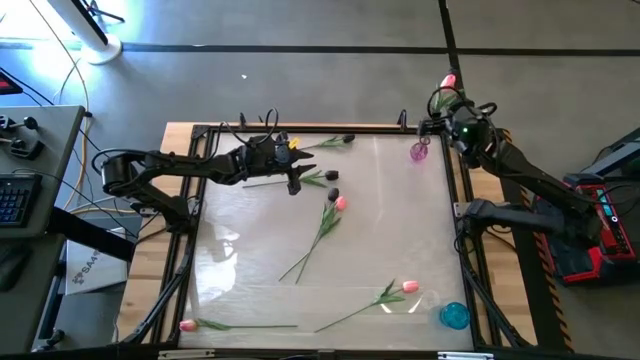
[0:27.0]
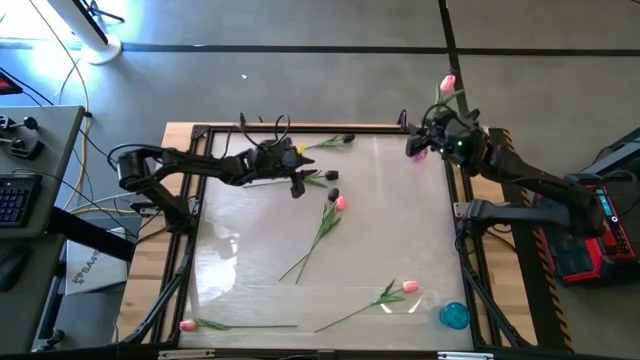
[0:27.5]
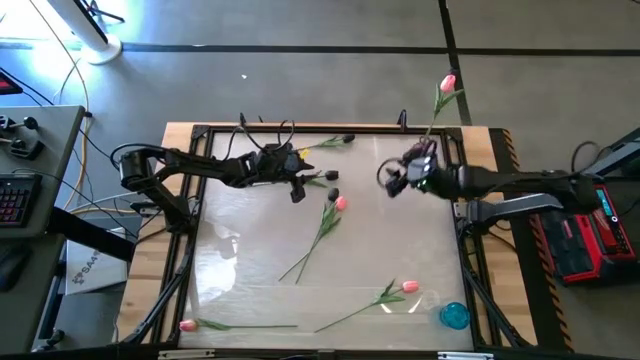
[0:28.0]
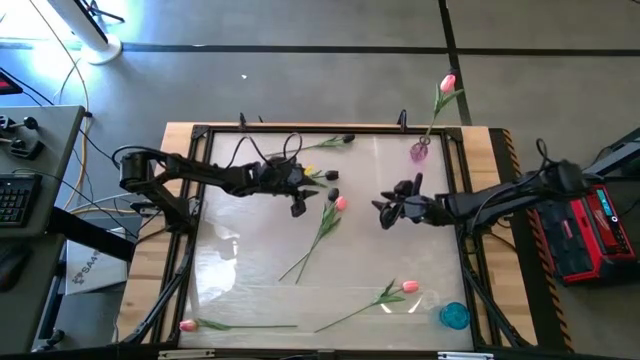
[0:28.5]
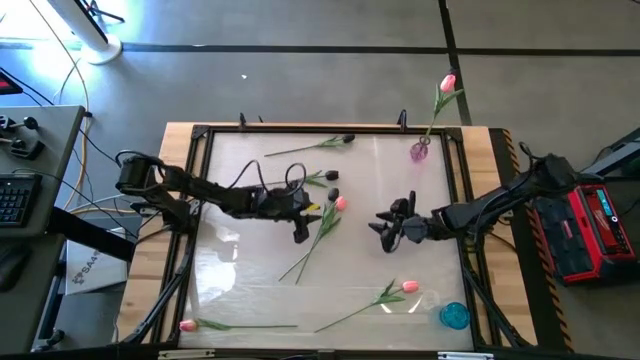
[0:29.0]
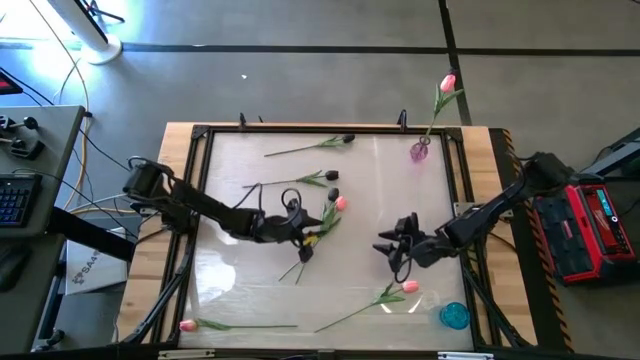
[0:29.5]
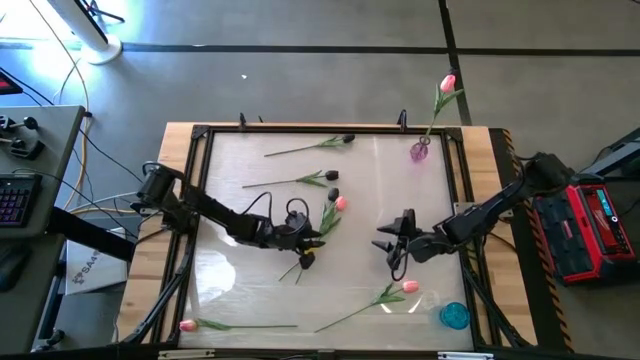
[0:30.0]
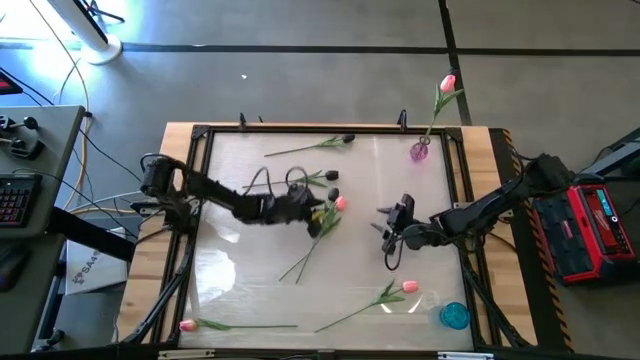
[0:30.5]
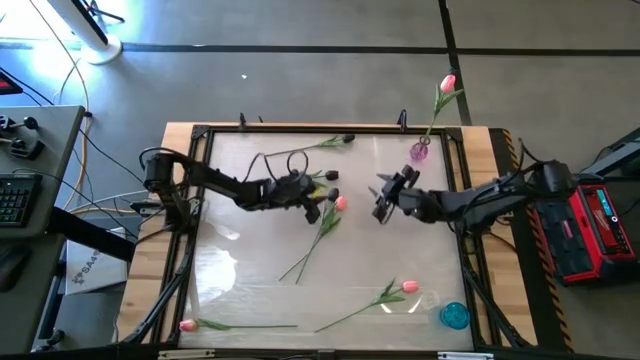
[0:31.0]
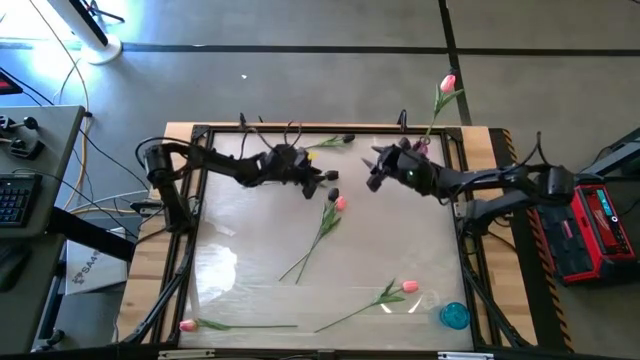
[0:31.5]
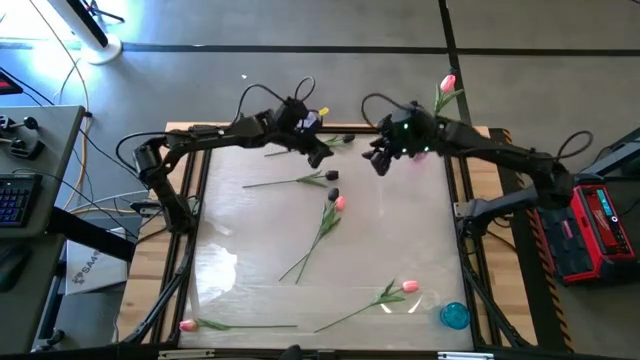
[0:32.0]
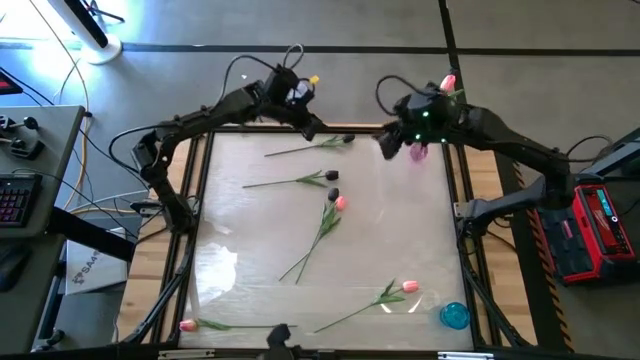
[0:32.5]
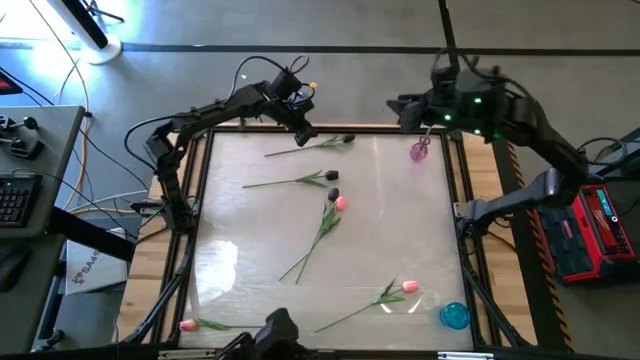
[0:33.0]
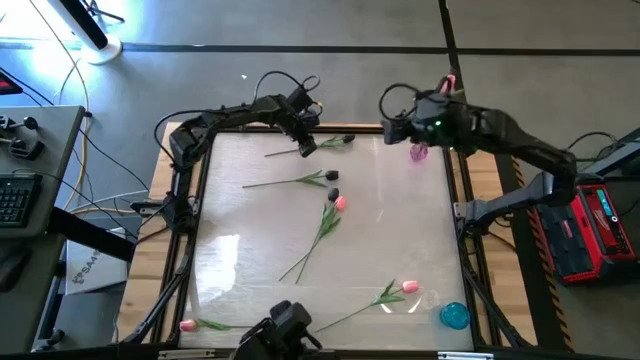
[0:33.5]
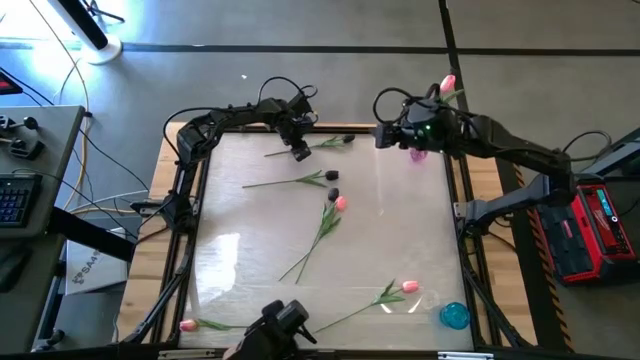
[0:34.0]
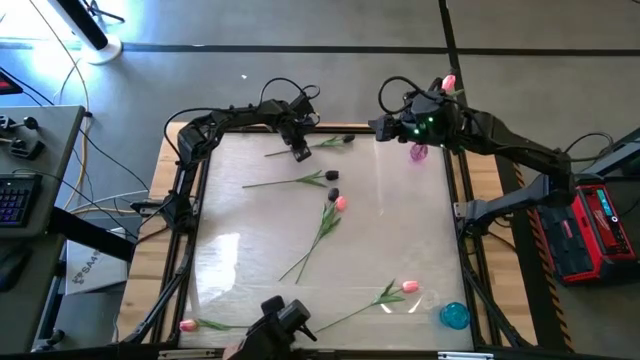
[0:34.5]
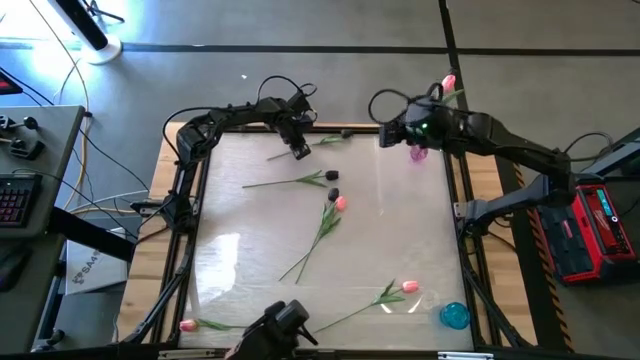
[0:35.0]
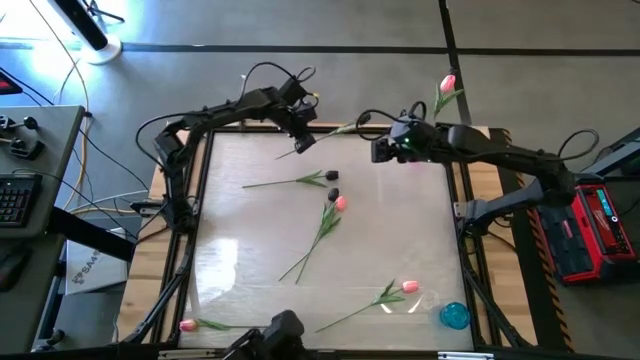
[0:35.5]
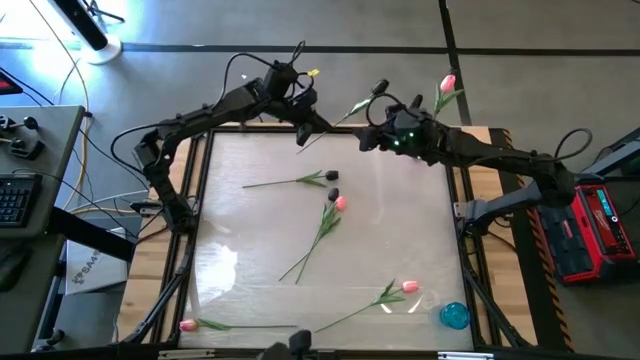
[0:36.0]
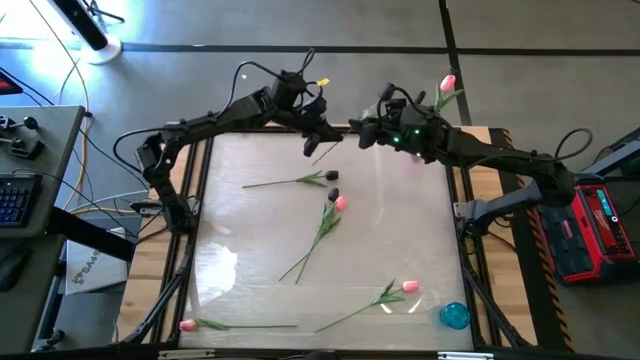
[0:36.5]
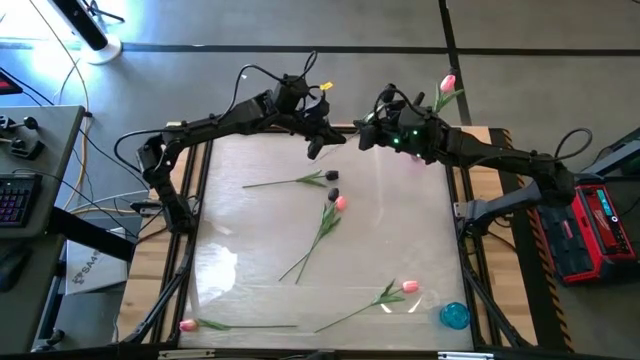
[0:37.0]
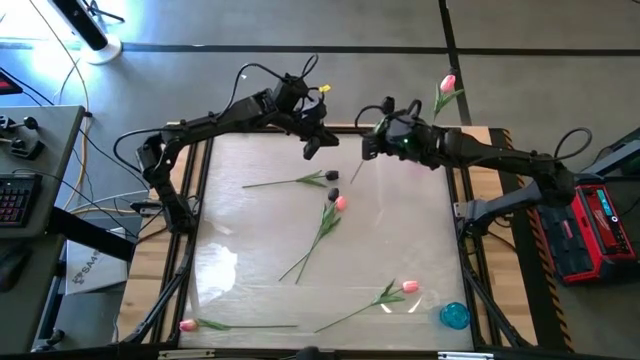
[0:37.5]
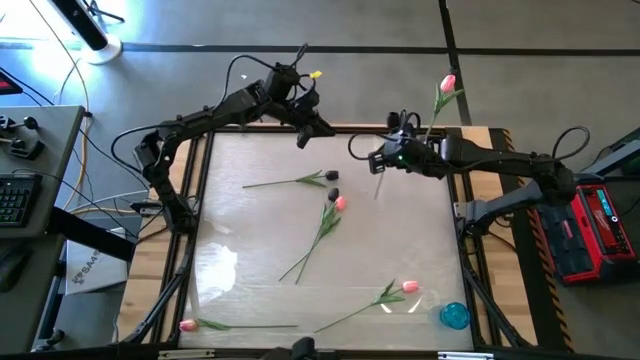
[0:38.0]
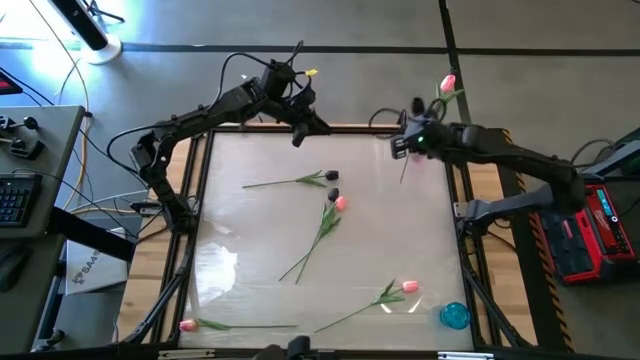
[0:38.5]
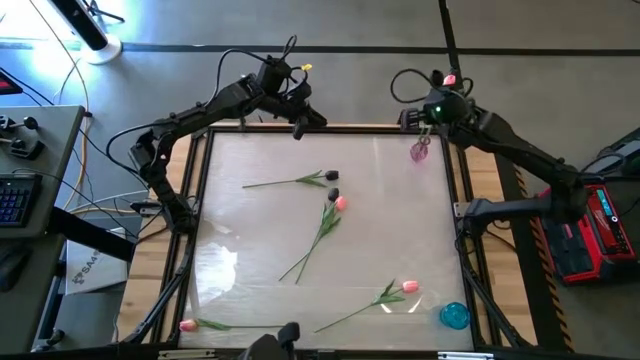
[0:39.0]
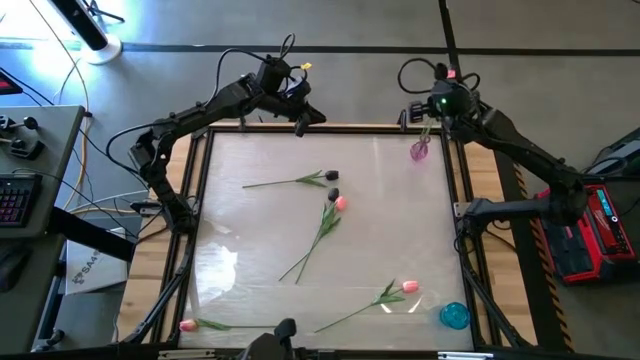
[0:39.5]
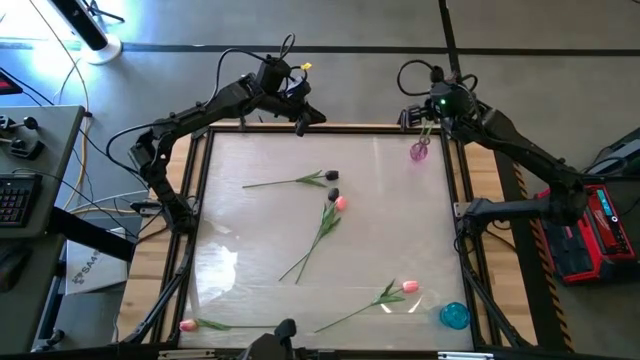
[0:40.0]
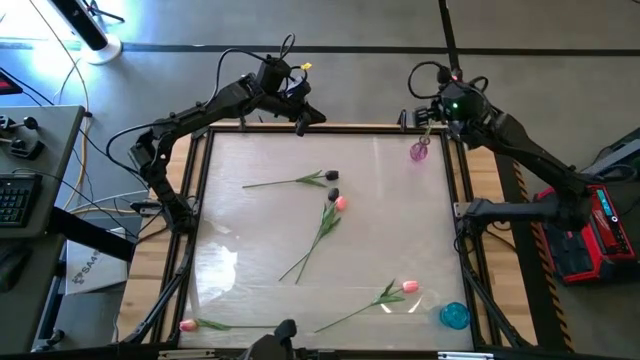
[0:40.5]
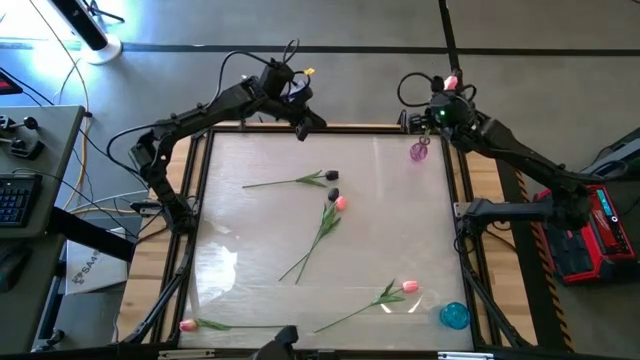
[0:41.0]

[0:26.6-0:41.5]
Task: Sort flowers into vase by color
Put the top center black flower into the purple vase

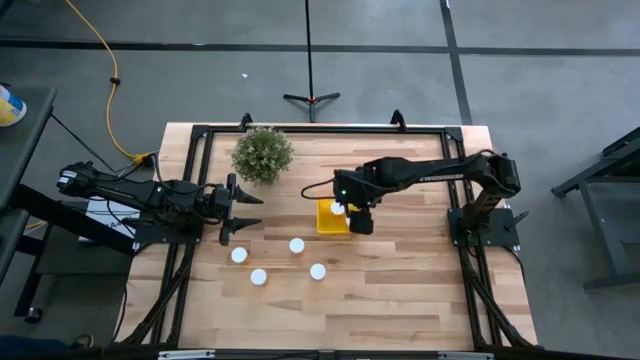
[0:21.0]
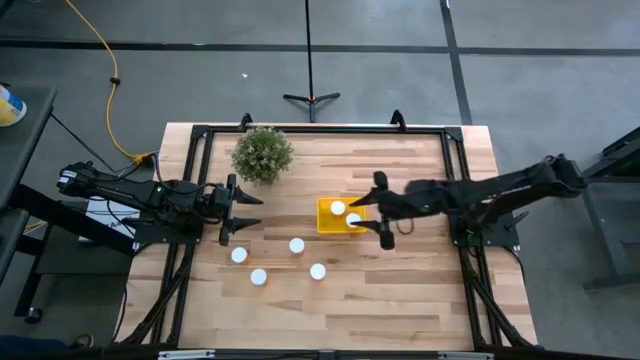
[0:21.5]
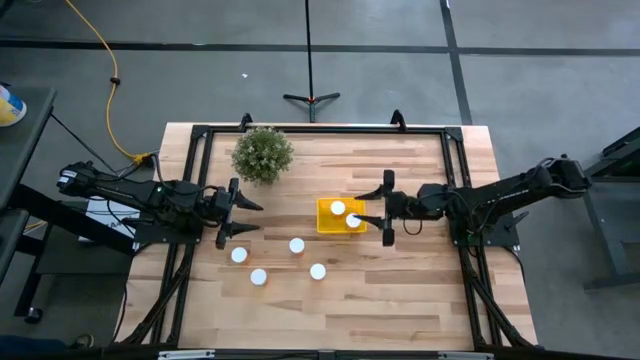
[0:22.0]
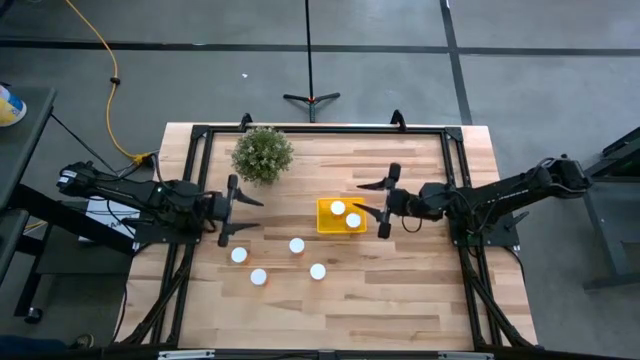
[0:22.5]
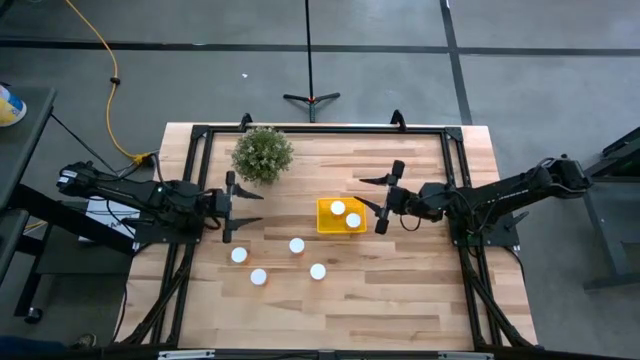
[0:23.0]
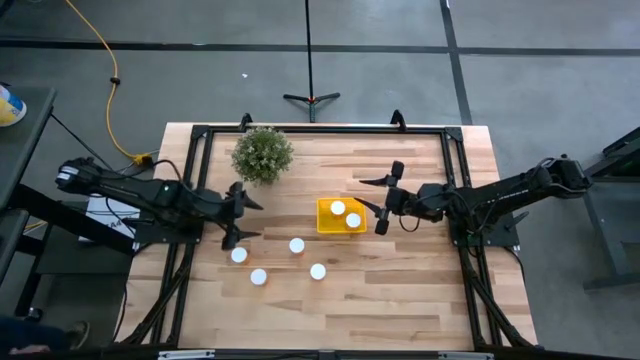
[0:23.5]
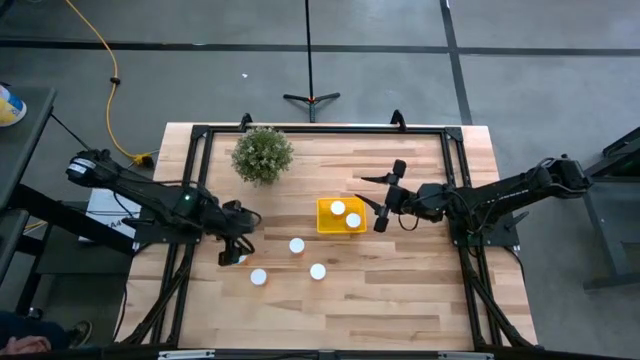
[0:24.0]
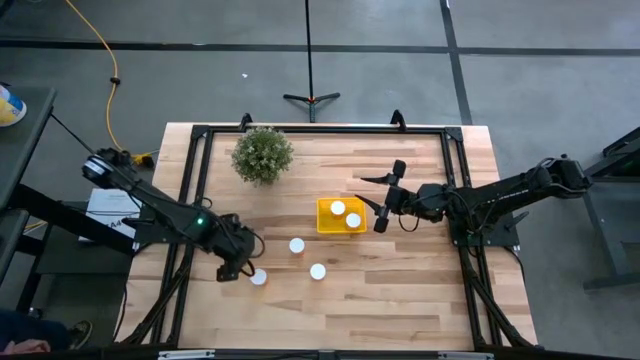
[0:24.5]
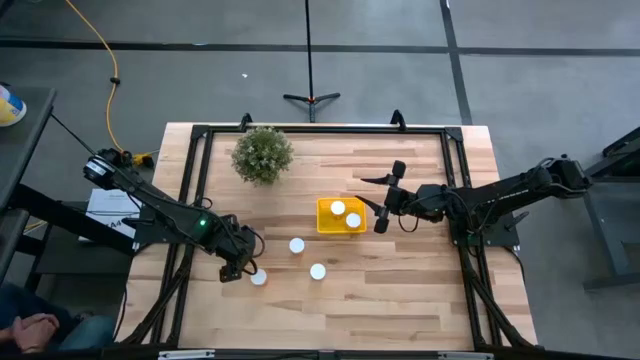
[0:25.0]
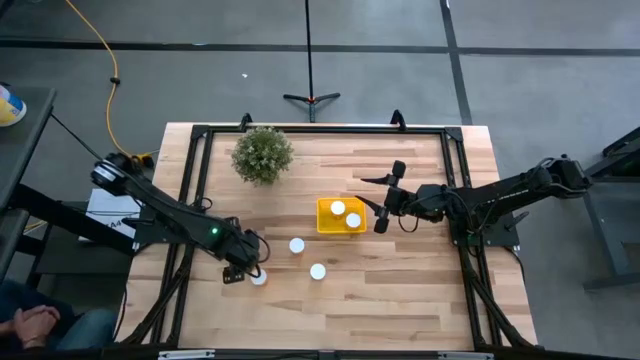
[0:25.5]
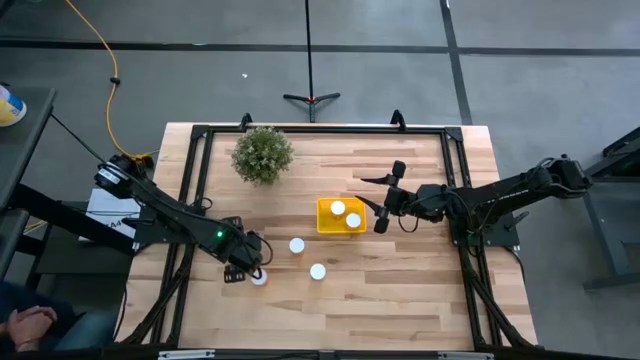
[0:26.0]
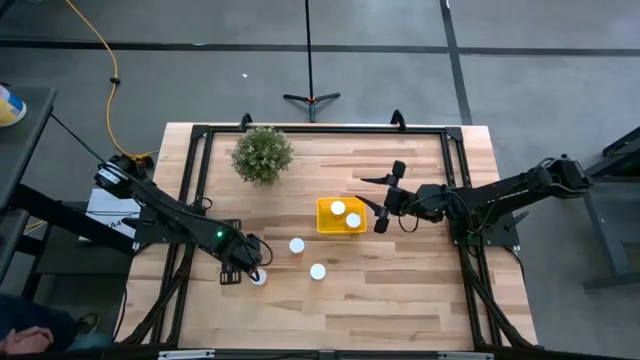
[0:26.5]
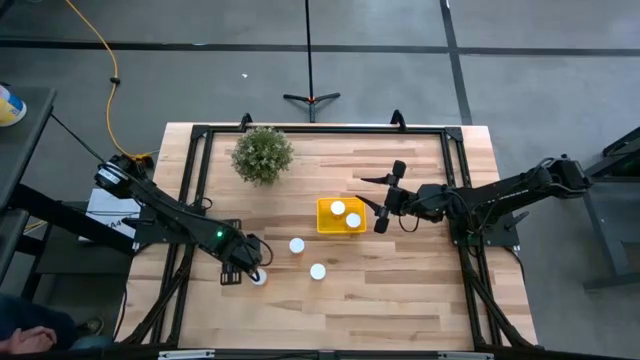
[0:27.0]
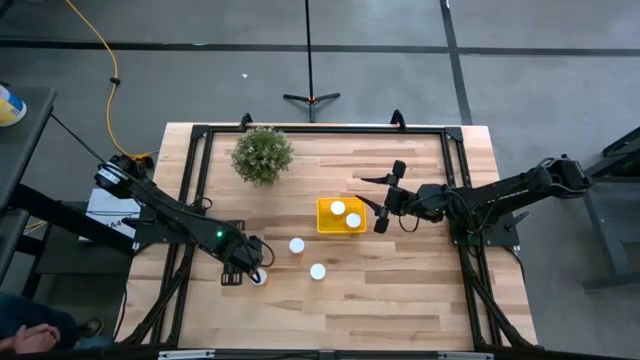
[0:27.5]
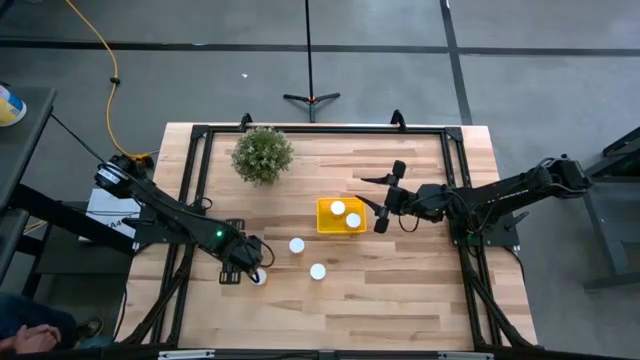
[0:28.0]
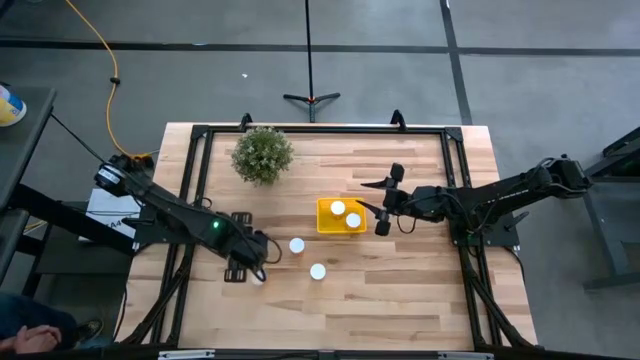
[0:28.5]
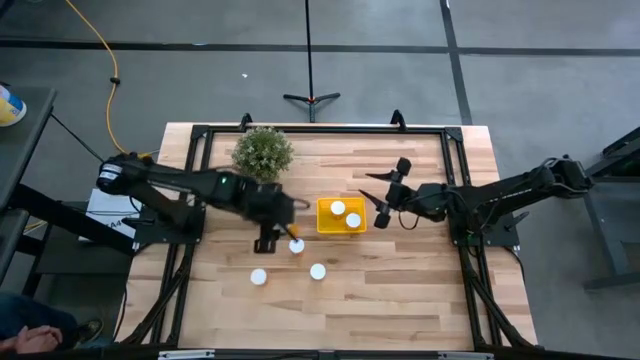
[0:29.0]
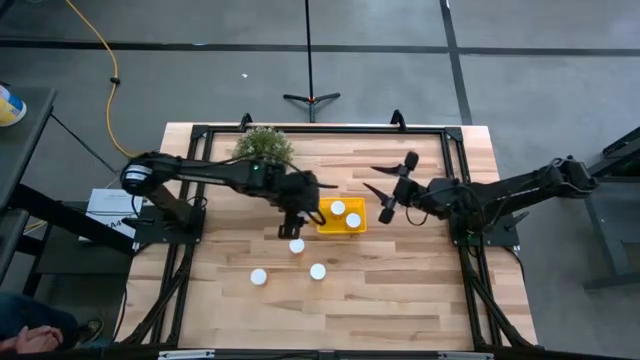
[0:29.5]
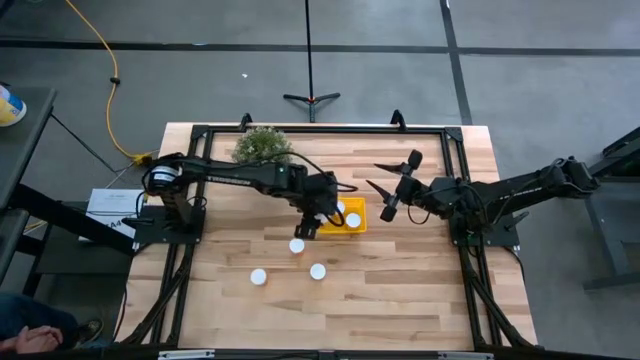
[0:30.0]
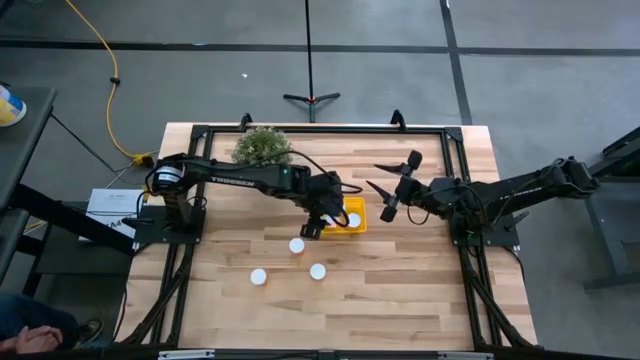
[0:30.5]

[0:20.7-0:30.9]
Task: Pick and place pill bottles into a basket
Put the orange pill bottle into the bottom left corner of the yellow basket
